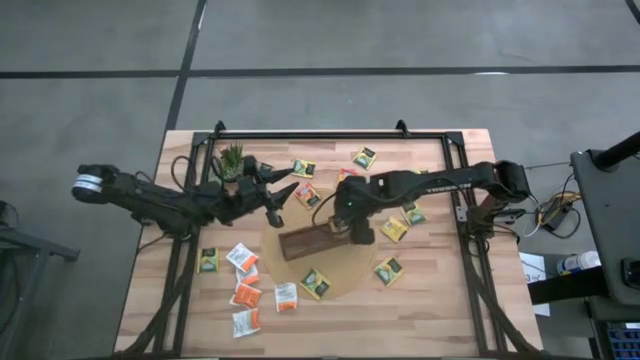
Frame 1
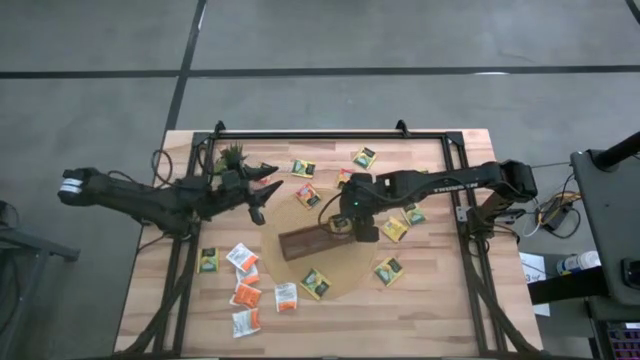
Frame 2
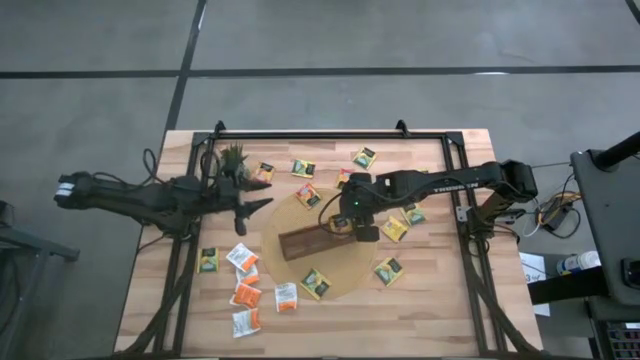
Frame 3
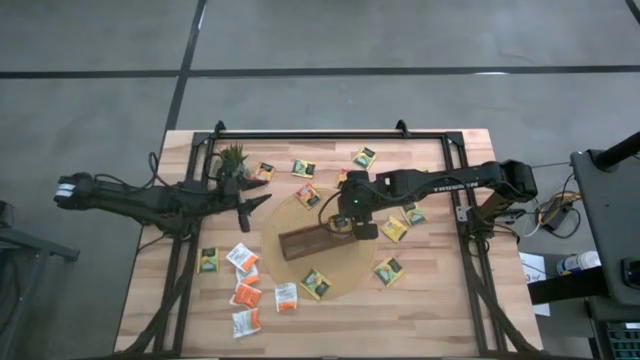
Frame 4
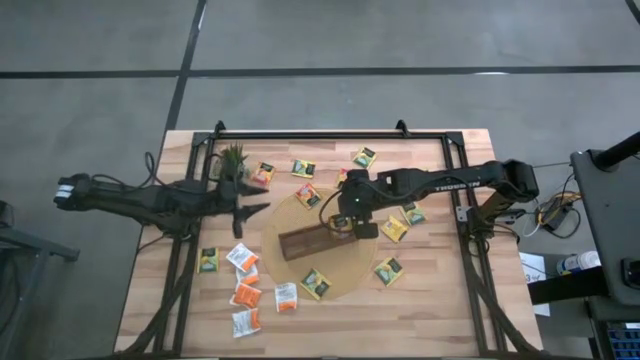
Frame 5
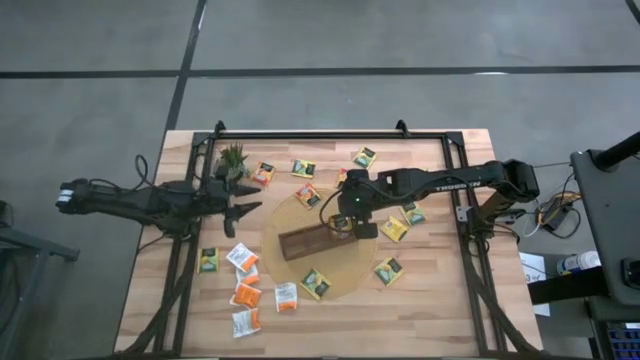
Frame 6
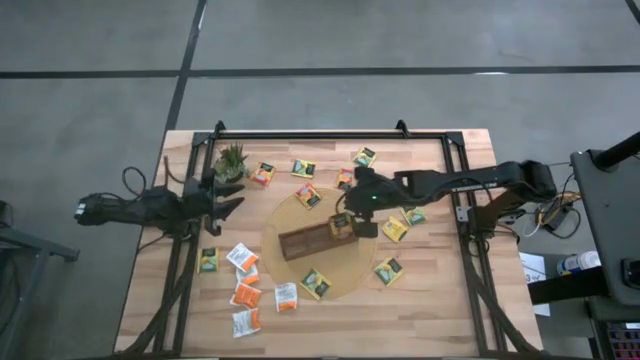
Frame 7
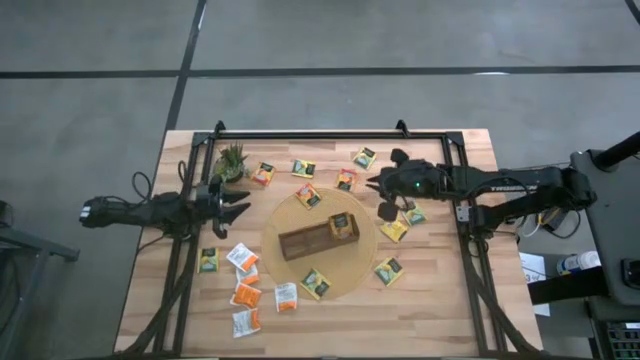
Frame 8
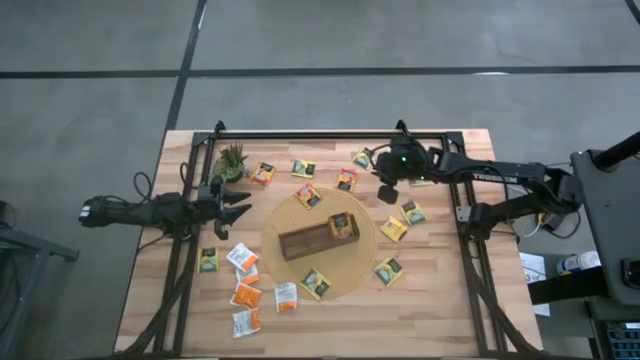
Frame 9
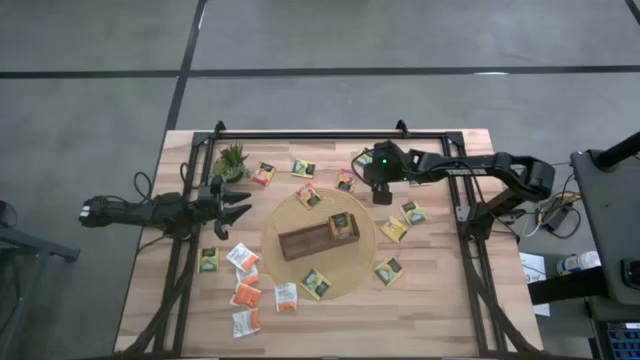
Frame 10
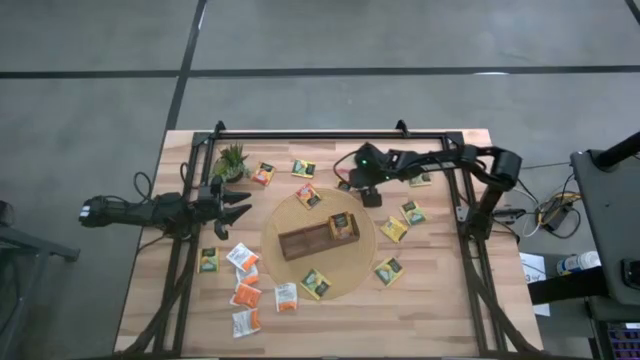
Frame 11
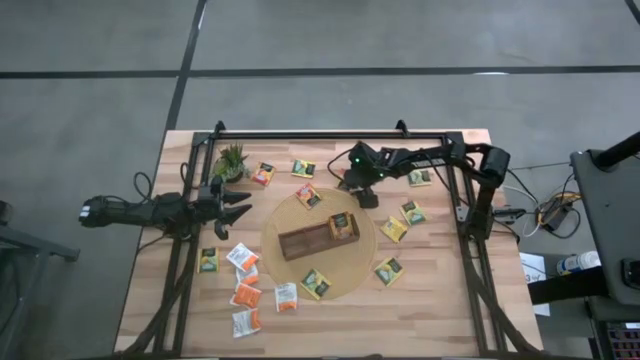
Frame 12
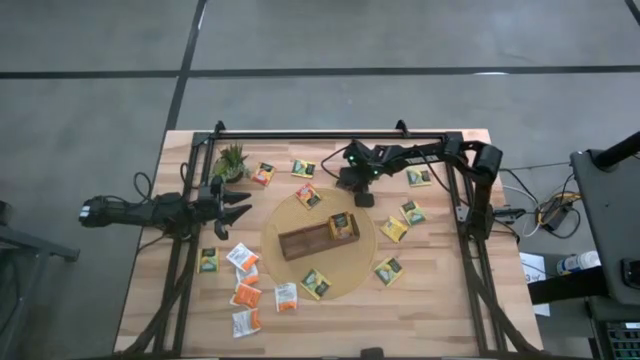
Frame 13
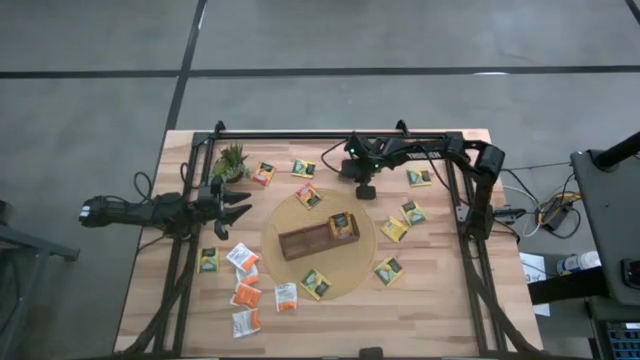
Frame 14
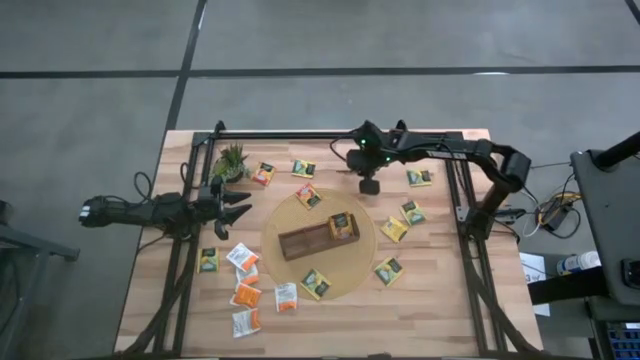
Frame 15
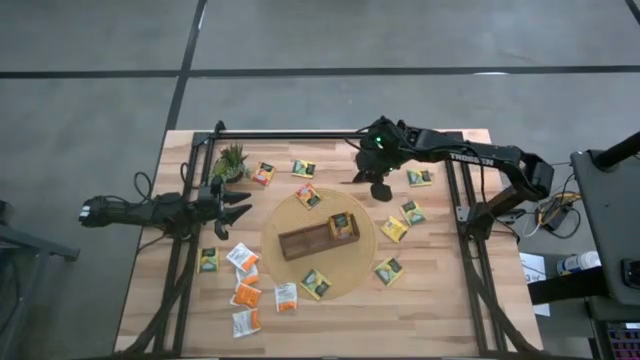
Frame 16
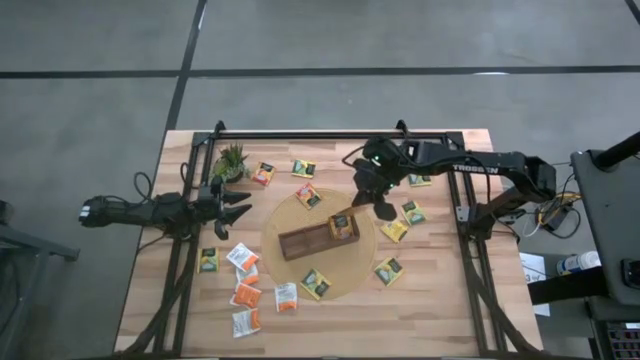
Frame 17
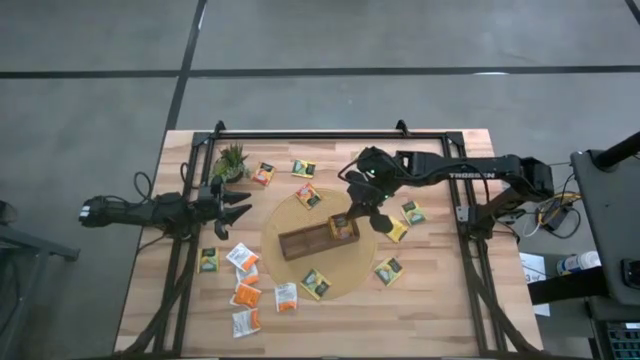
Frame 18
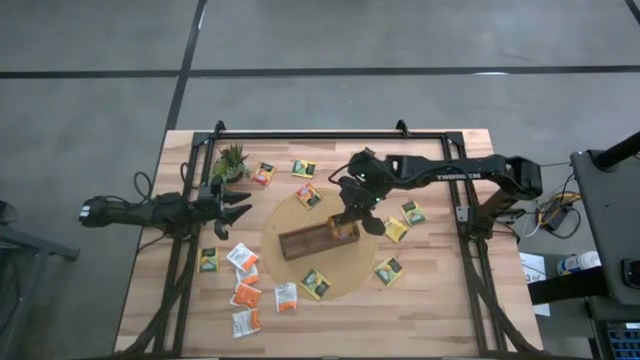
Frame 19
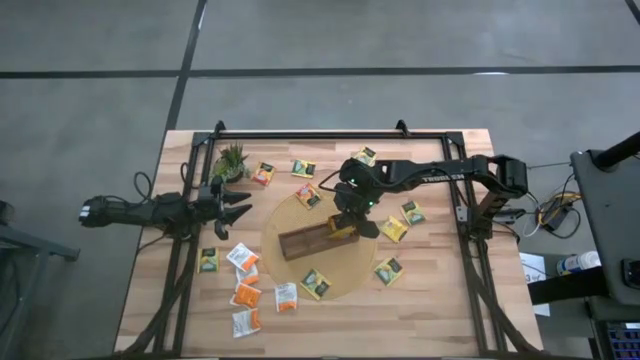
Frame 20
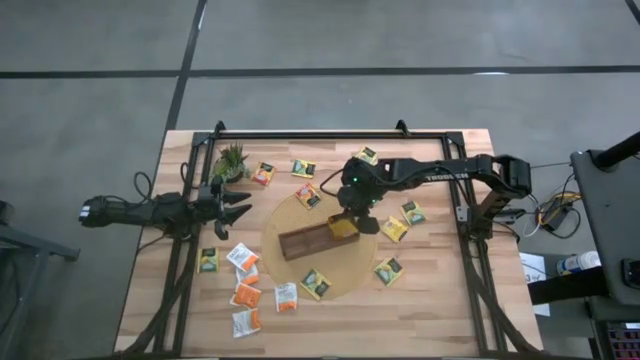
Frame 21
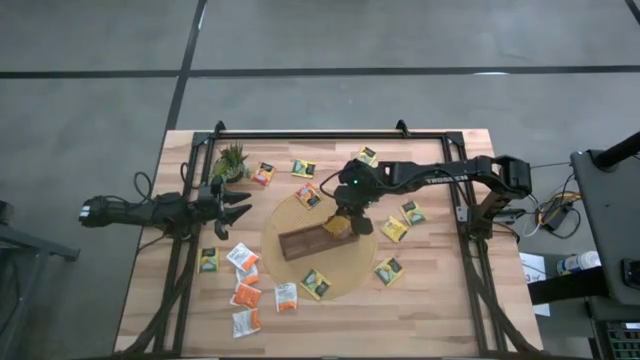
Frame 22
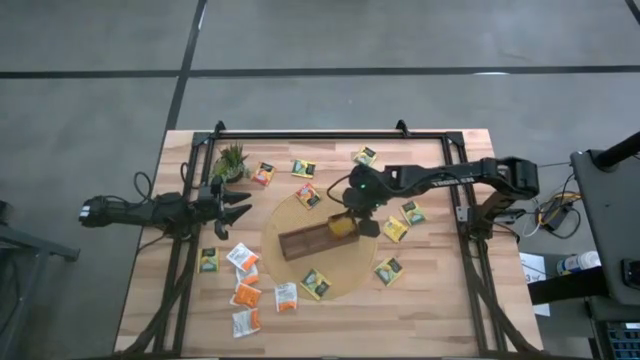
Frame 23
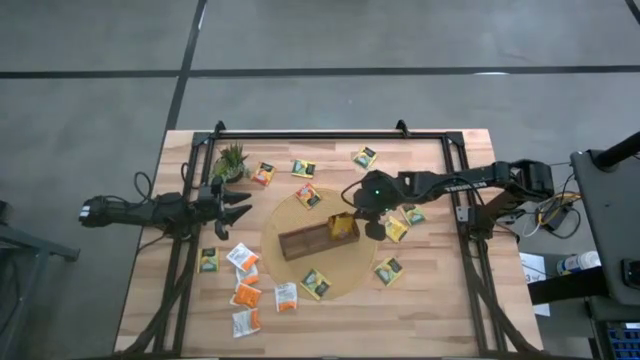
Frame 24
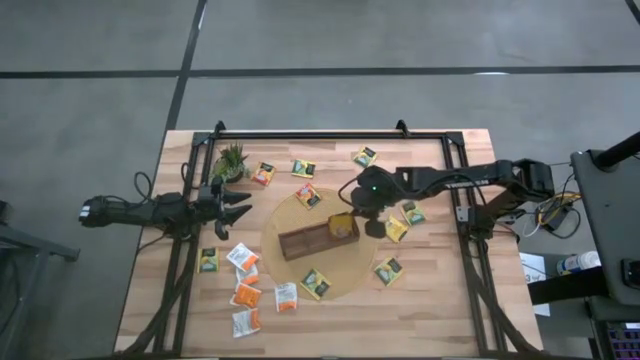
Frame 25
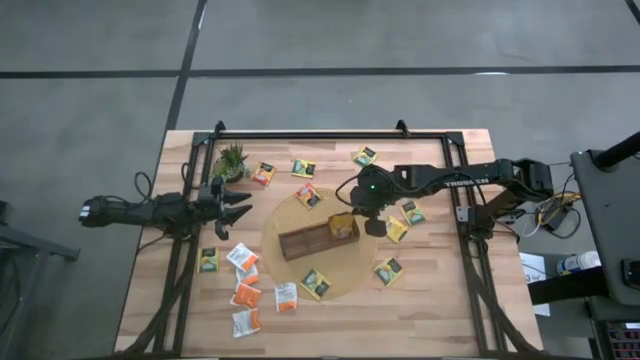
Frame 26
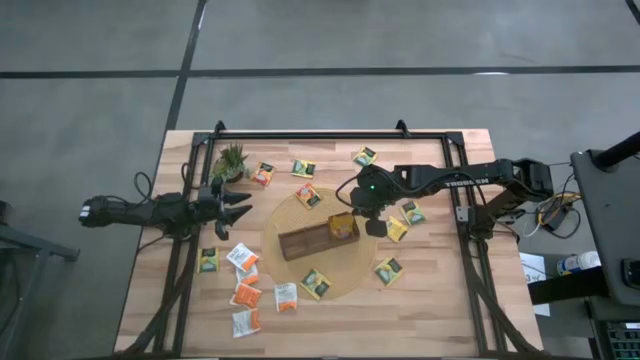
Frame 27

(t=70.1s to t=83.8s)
Task: Pick & Place Tea
Put the orange tea bag into the right section of the wooden organizer

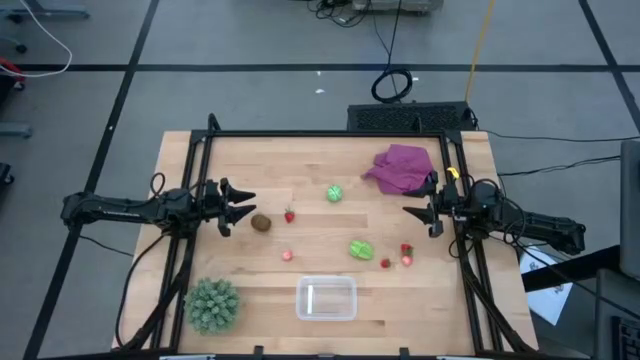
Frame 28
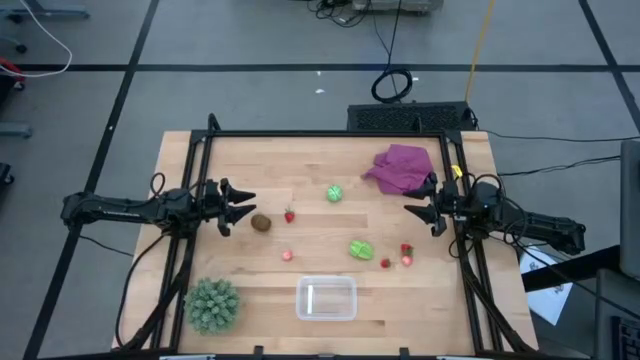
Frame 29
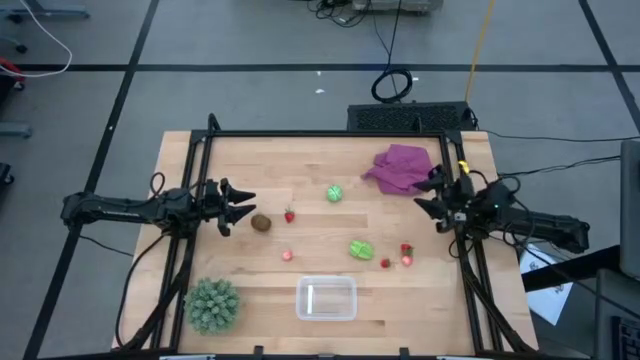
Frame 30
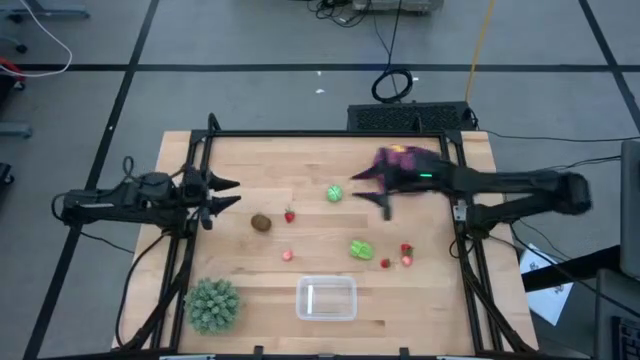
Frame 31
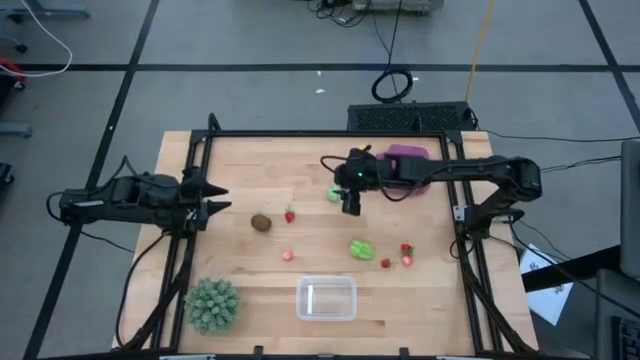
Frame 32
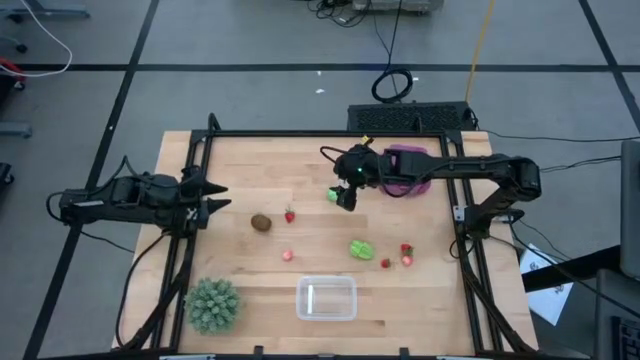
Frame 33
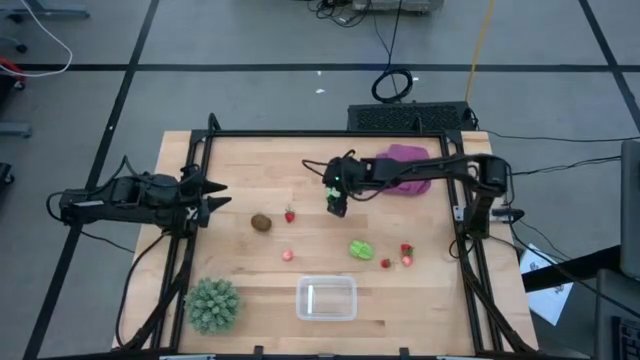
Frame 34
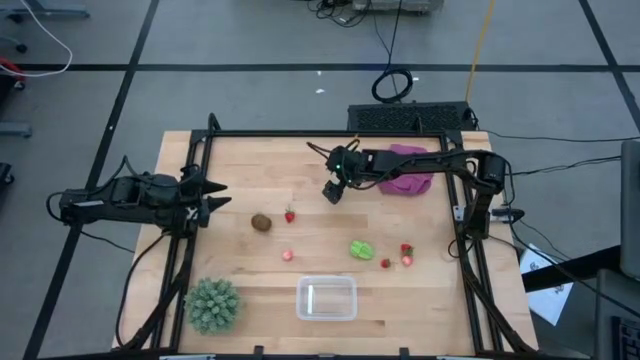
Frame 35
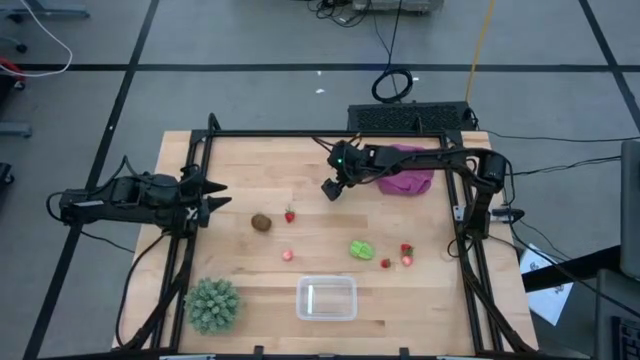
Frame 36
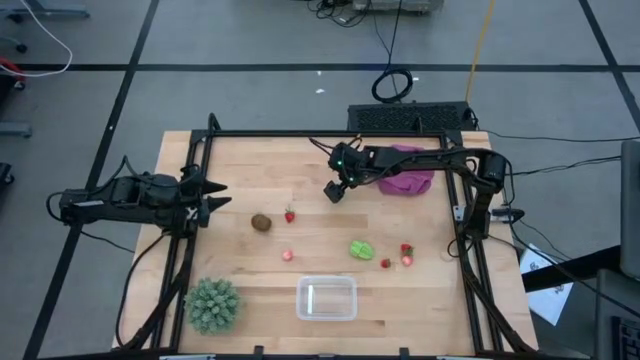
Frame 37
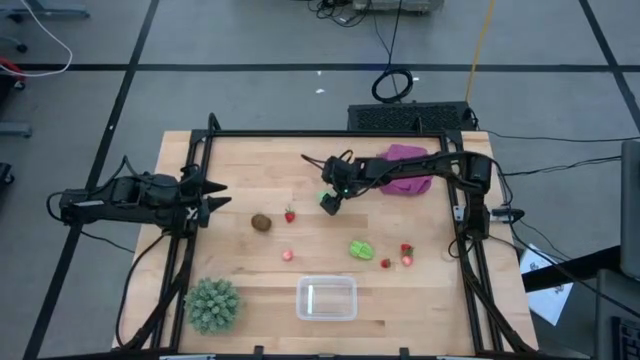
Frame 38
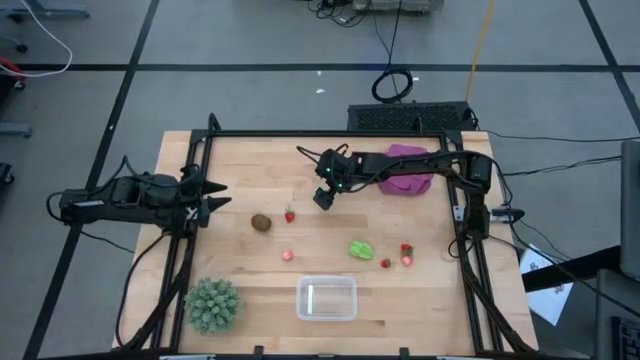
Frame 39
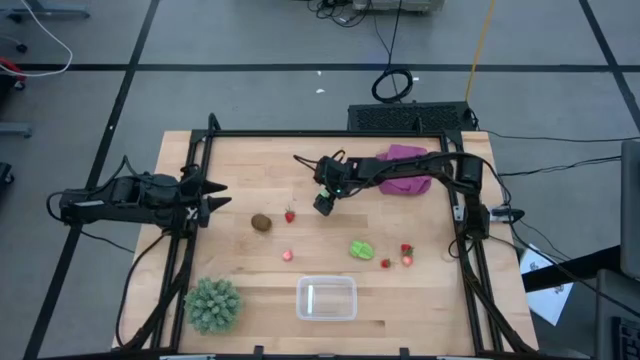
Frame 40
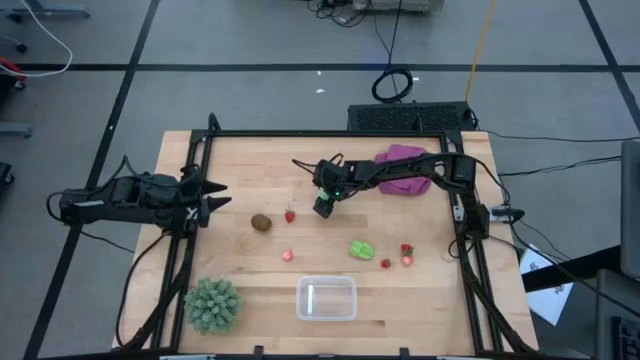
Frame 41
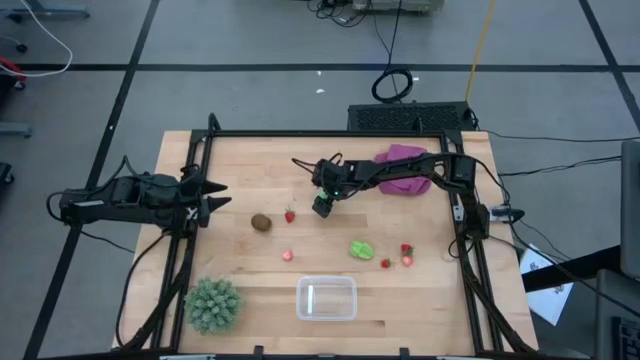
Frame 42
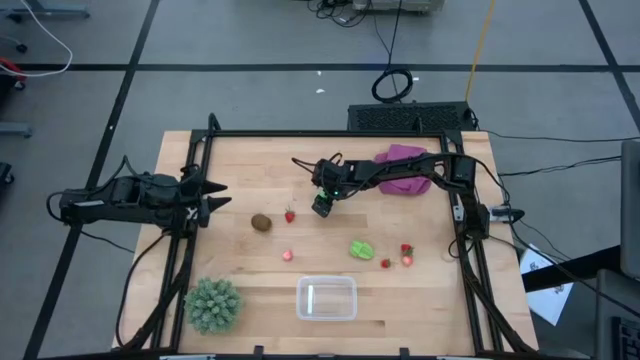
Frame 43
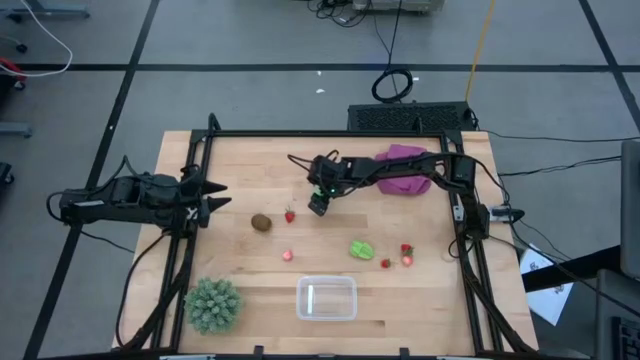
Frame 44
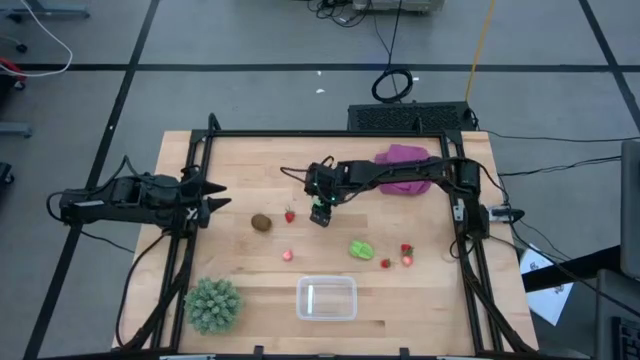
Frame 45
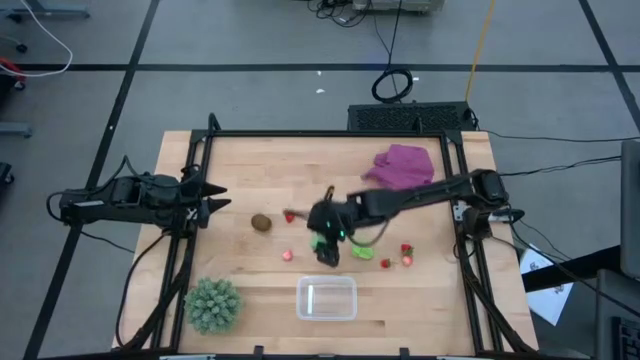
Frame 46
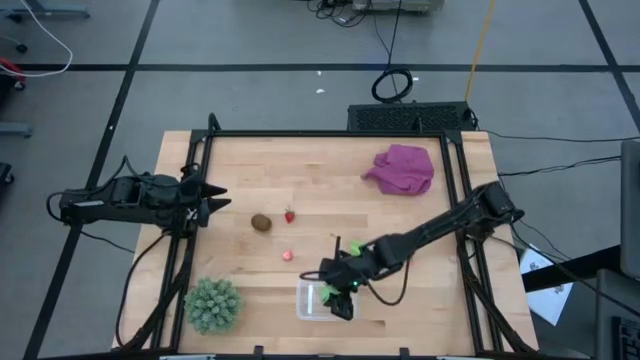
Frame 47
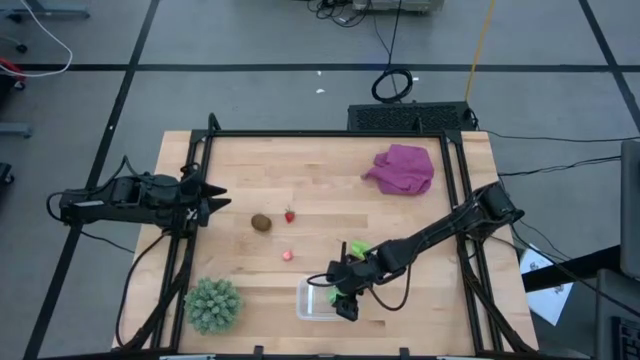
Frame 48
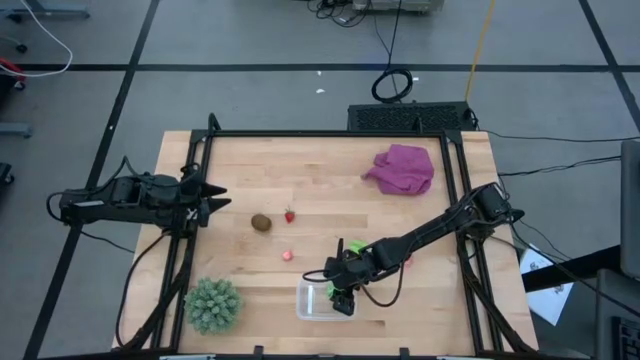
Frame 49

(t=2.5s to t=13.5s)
Task: Pick and placing Produce into tupperware
Put the green cabbage into the transparent bin
